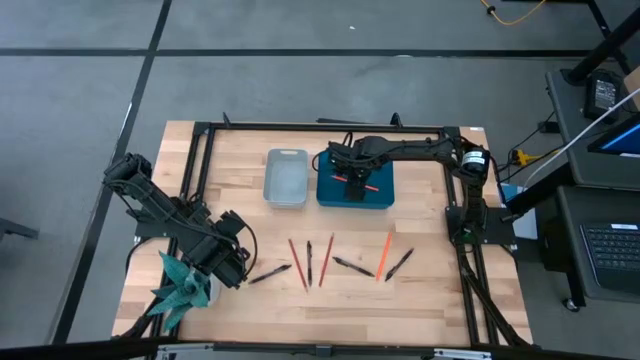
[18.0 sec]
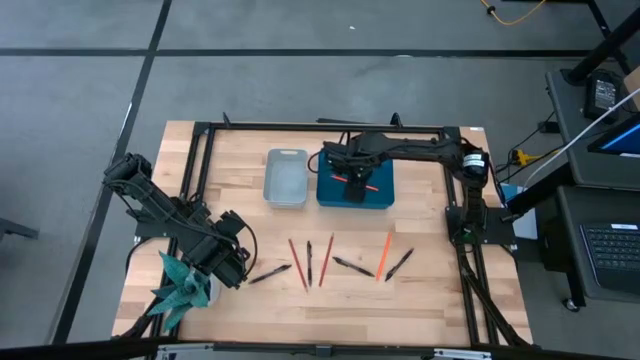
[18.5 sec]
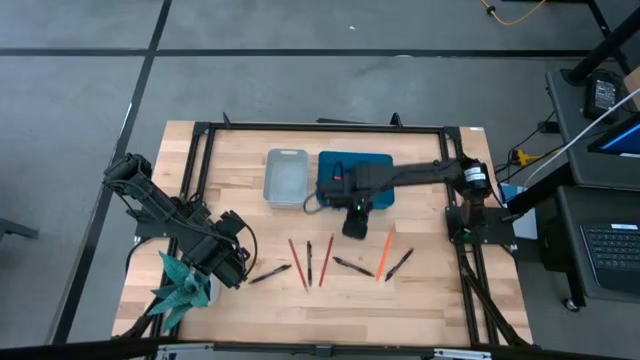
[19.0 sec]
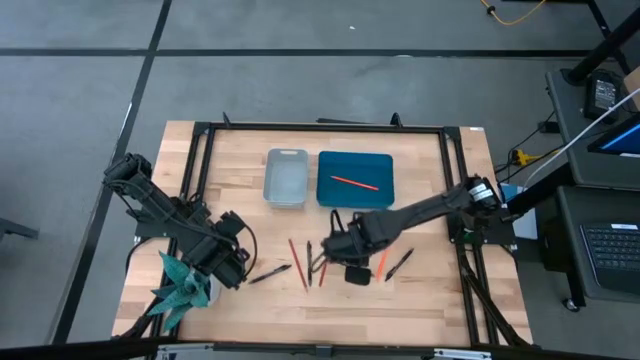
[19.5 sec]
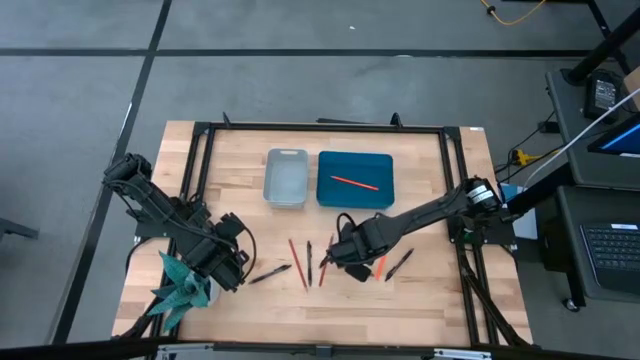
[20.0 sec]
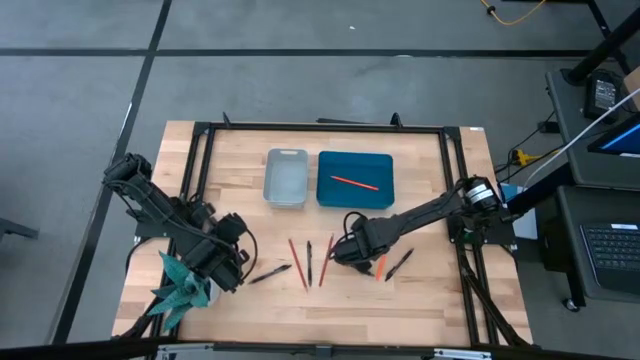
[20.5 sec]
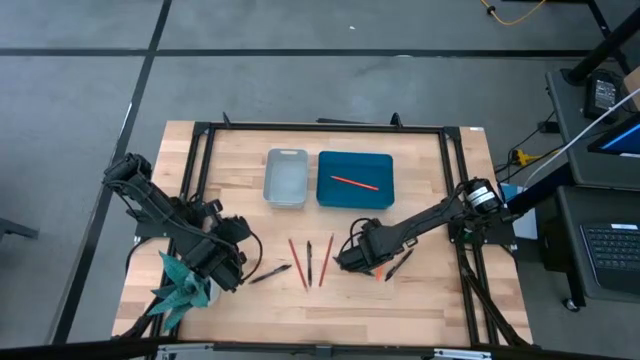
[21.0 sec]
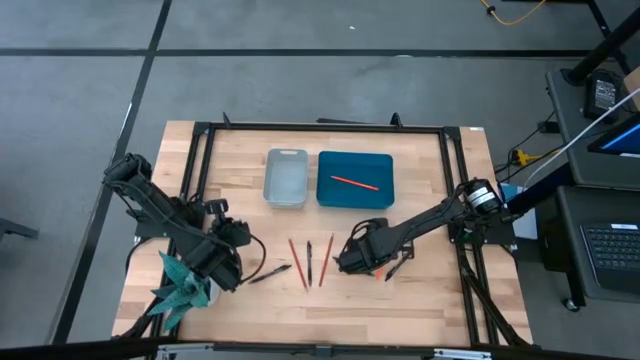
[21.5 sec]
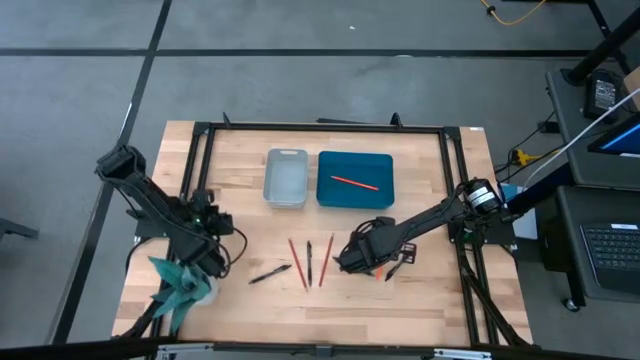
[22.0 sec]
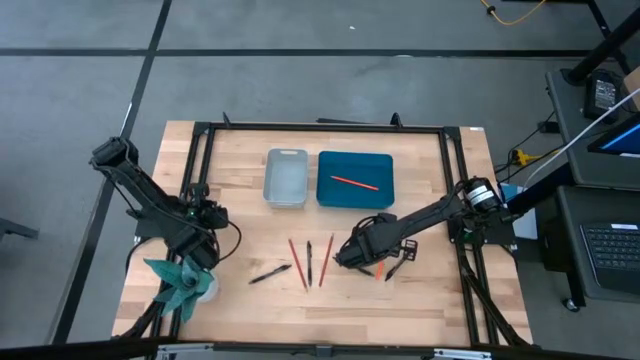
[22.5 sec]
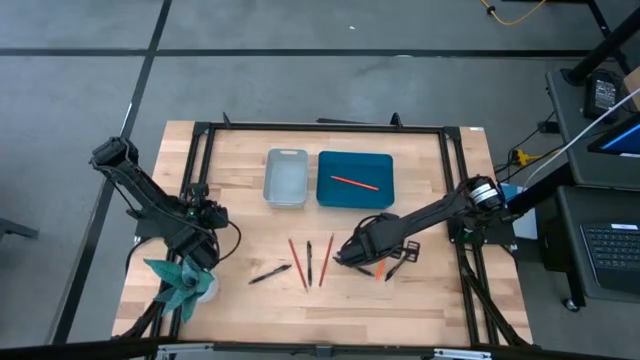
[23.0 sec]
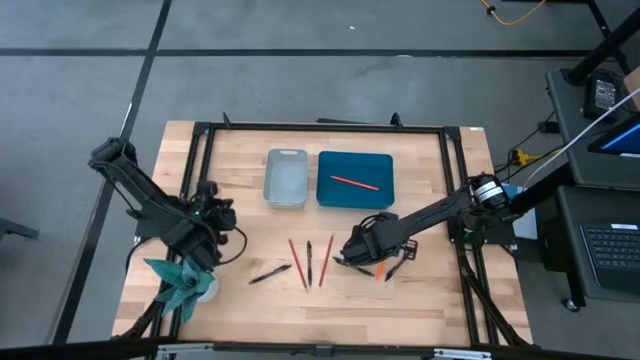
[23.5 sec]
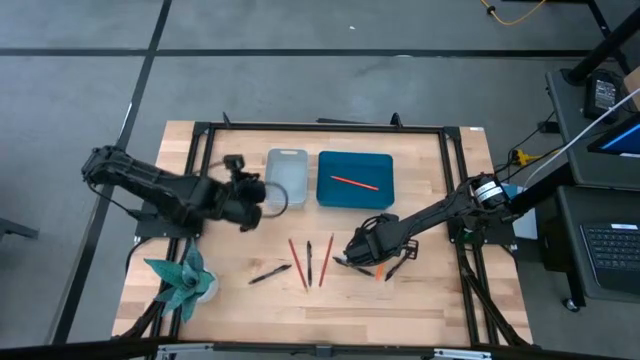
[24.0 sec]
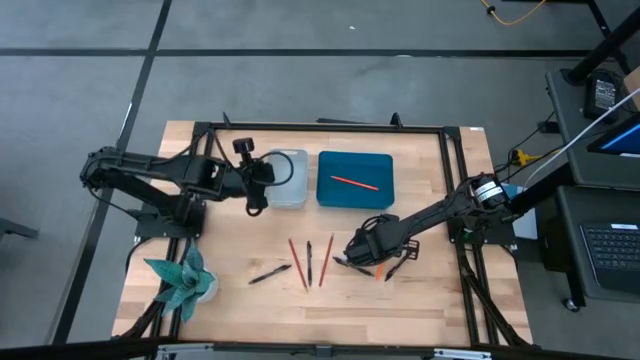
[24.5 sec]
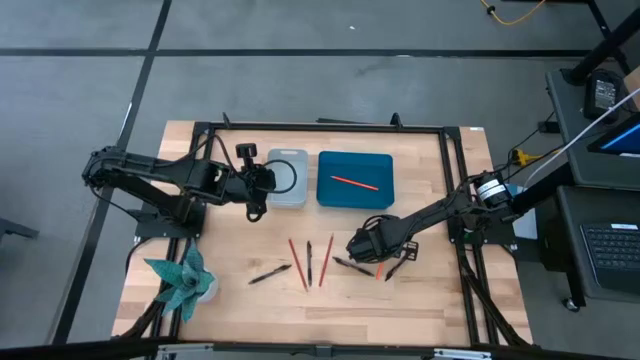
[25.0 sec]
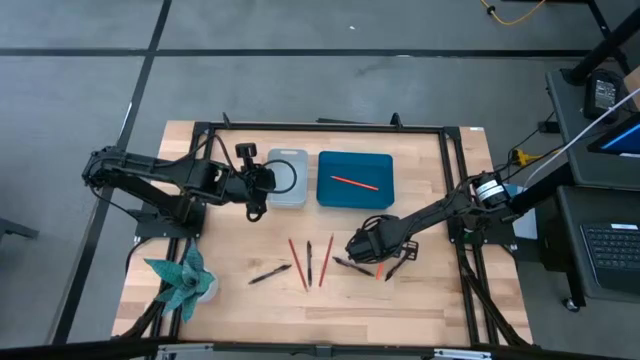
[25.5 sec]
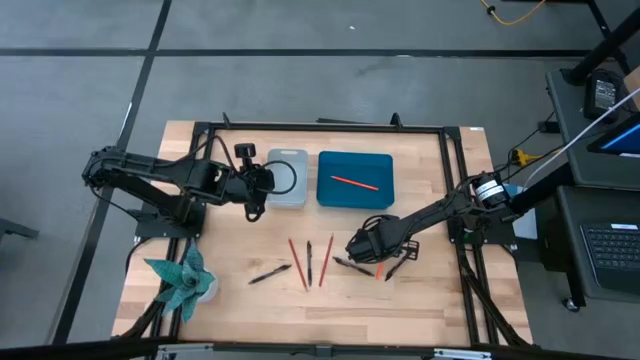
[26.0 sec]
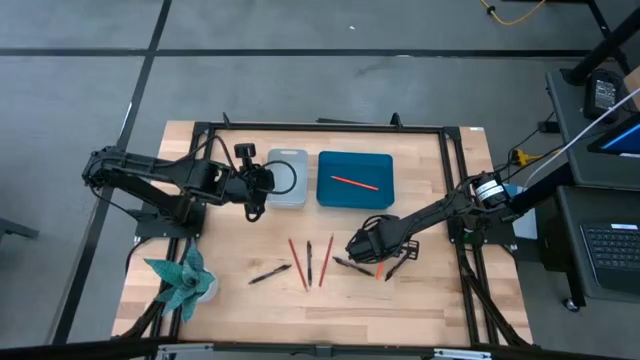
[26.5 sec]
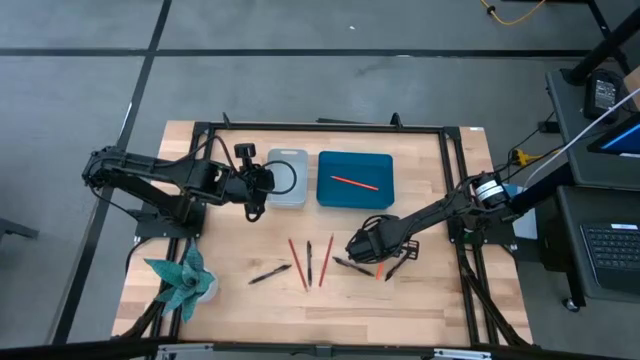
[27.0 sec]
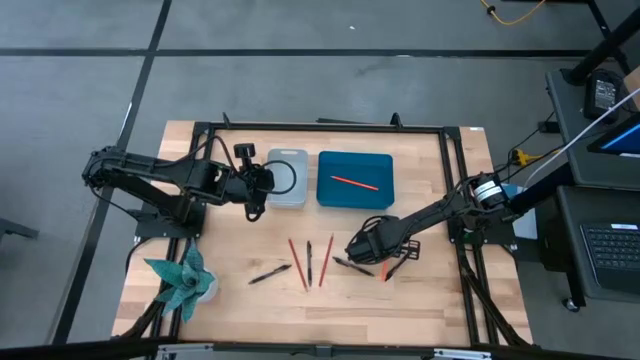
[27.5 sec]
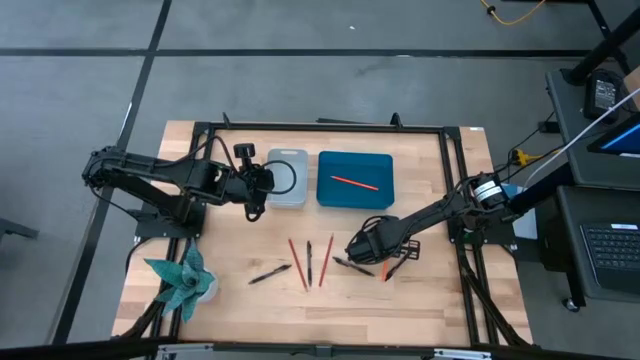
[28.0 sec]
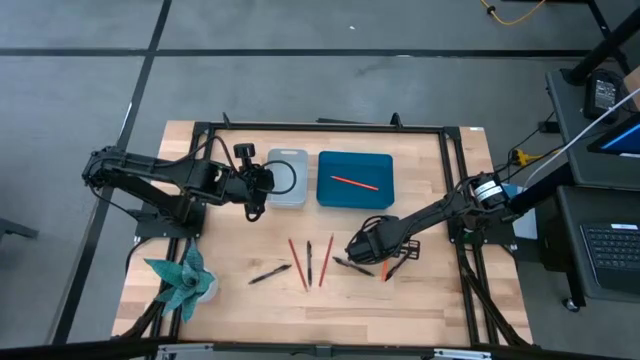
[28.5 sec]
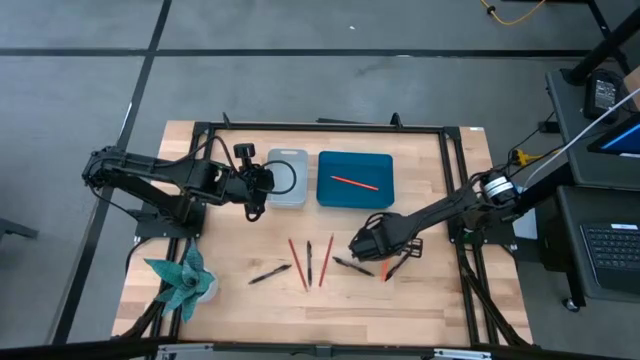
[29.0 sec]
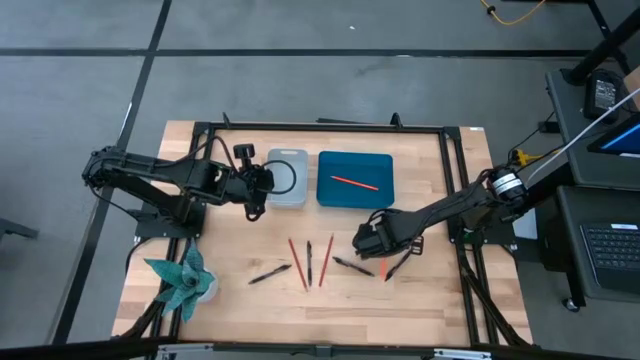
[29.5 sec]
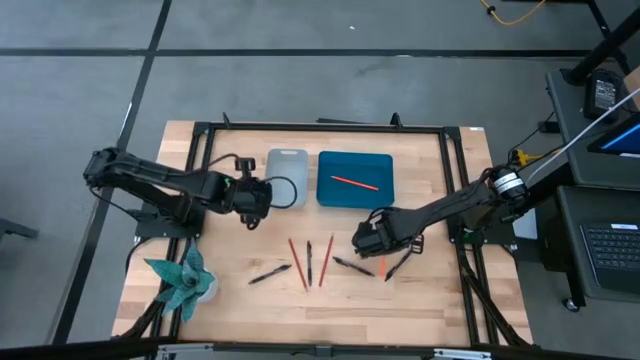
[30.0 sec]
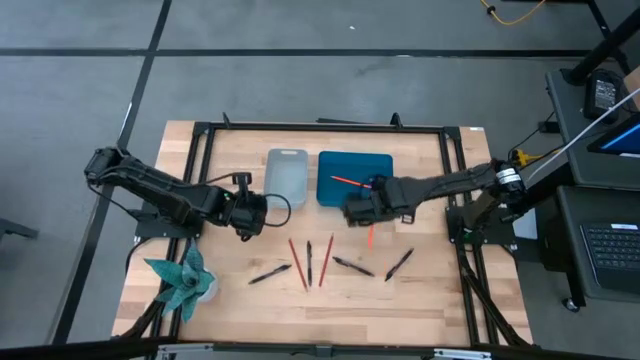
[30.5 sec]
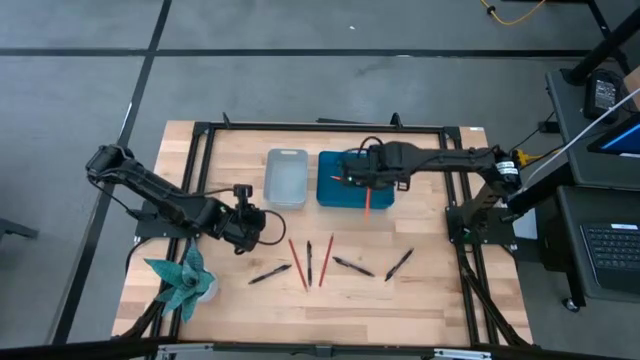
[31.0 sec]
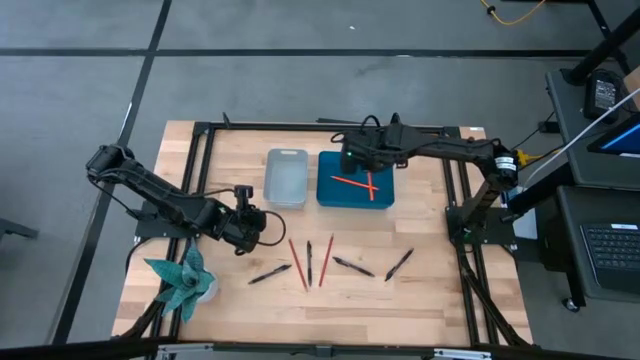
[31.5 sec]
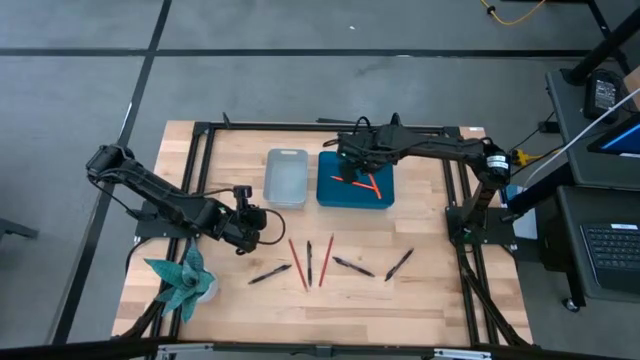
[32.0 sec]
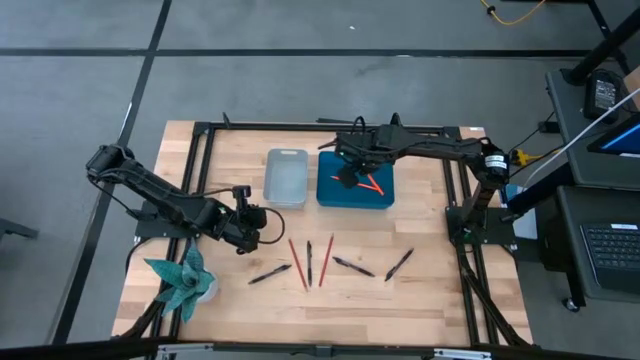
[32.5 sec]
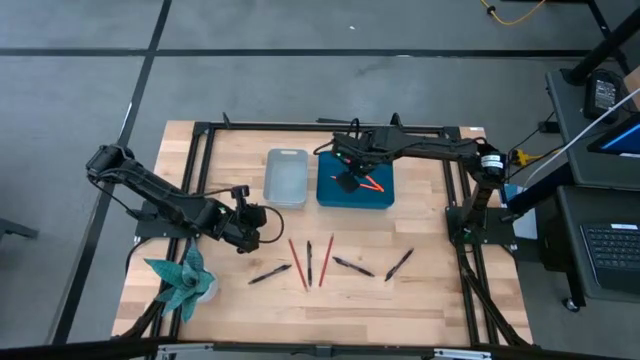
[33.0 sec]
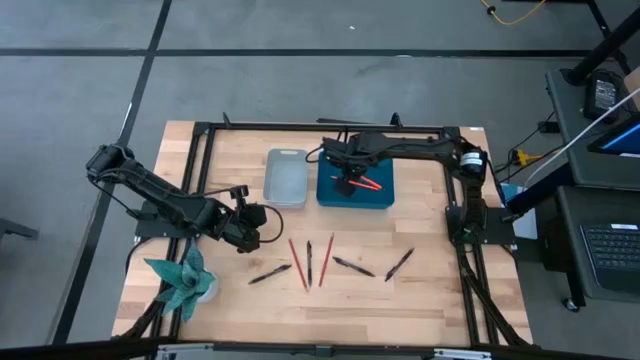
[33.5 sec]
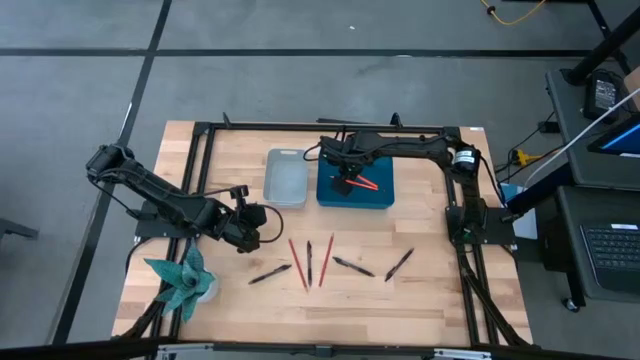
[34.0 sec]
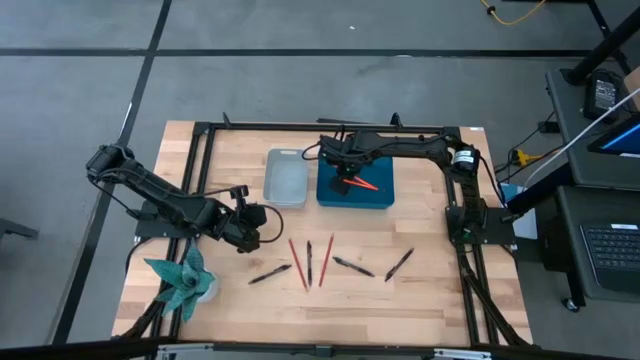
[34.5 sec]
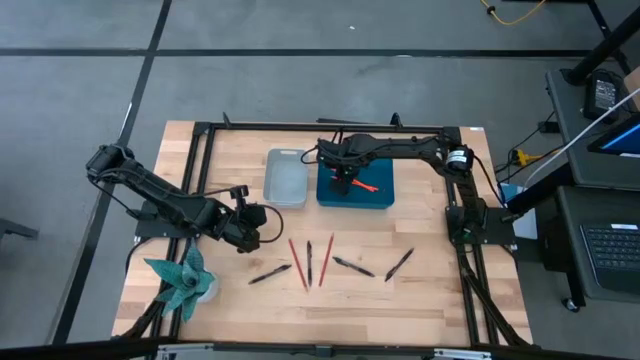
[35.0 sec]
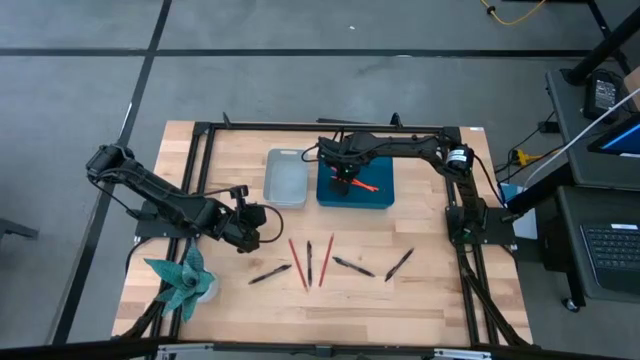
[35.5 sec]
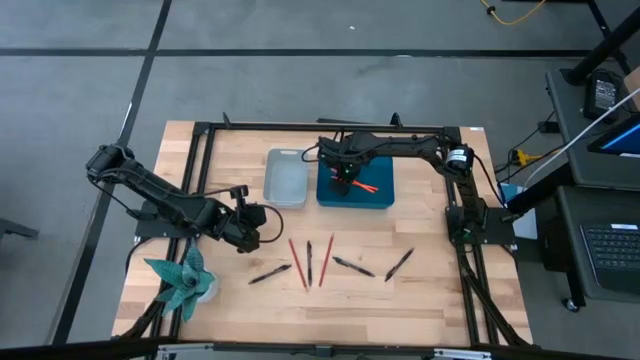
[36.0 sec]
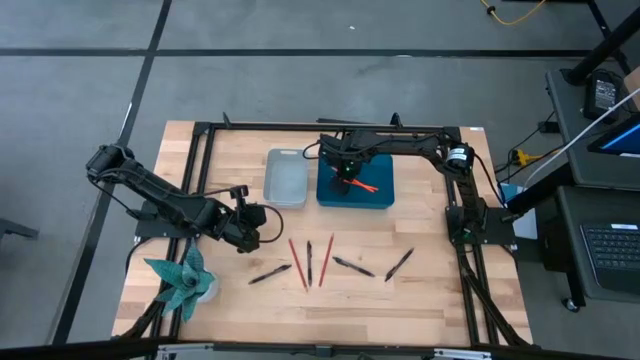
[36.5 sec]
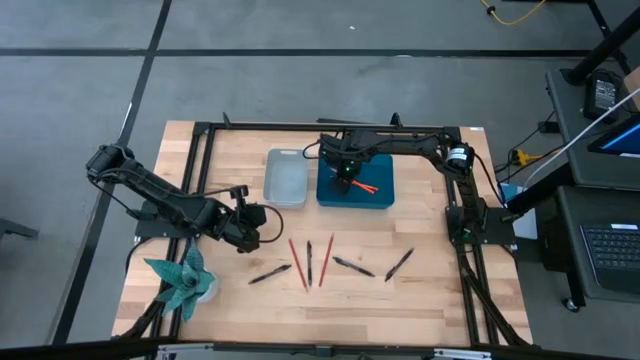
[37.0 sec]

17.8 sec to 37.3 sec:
Task: Sort pens & pencils
Put the orange pencil into the blue bin

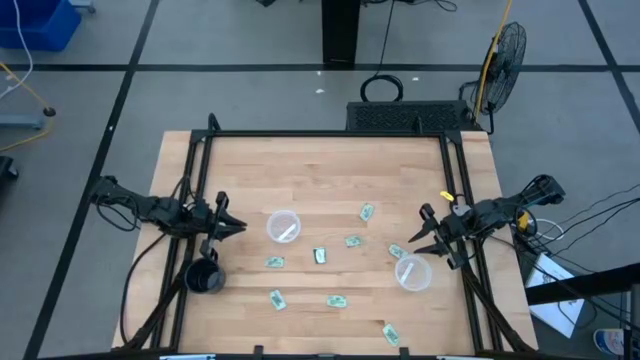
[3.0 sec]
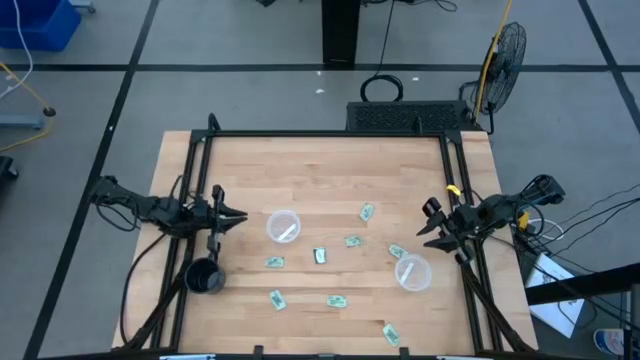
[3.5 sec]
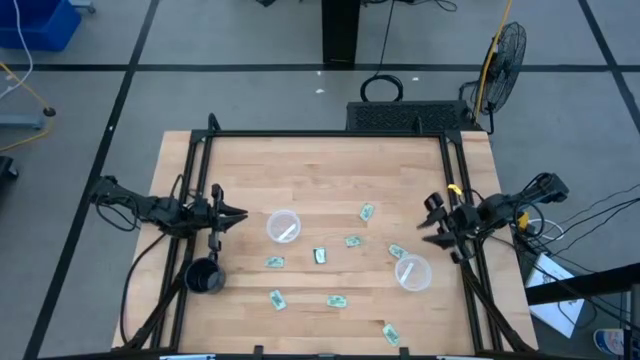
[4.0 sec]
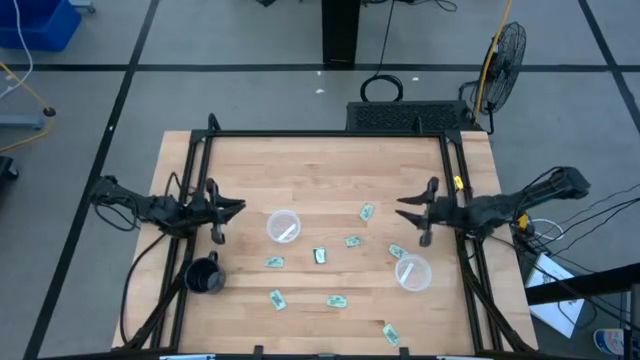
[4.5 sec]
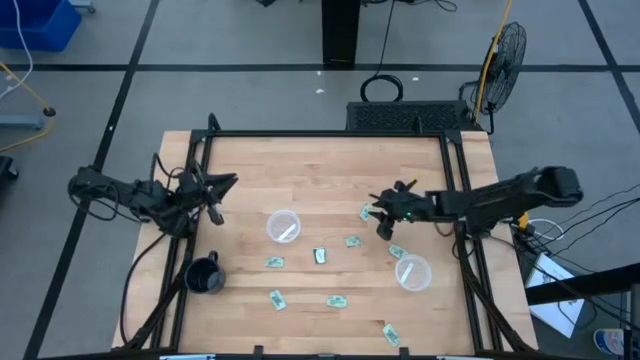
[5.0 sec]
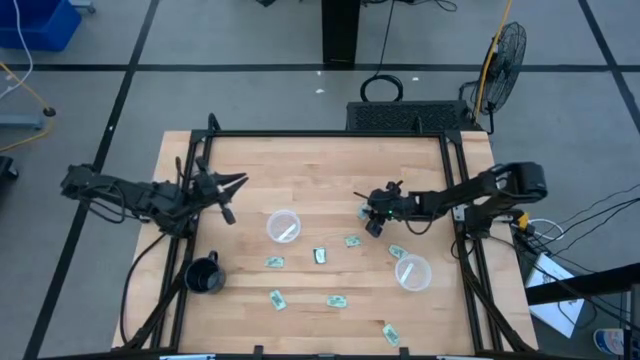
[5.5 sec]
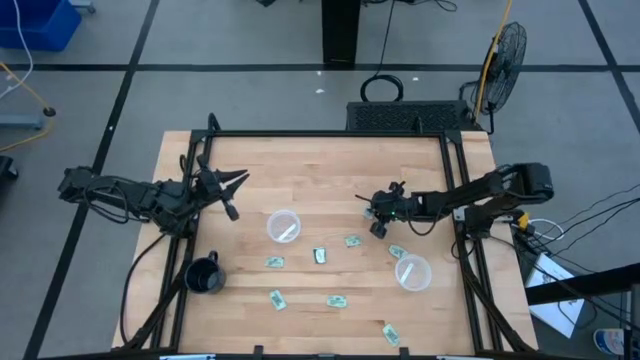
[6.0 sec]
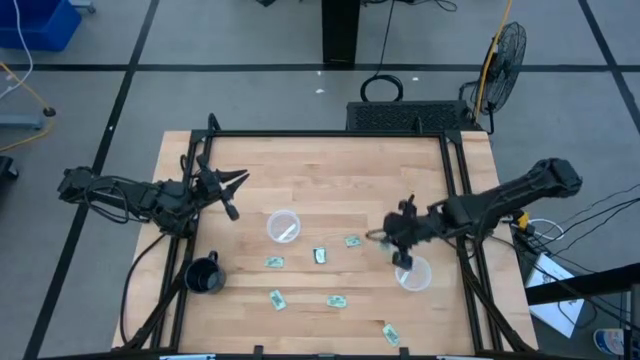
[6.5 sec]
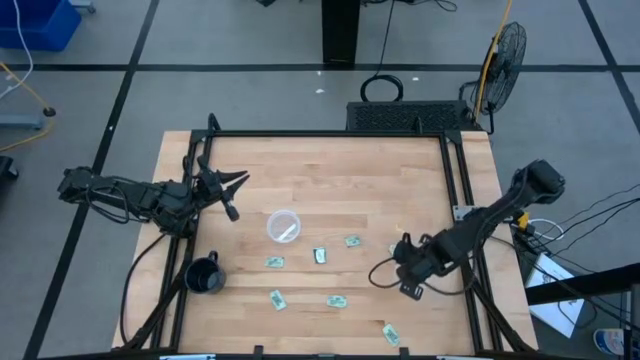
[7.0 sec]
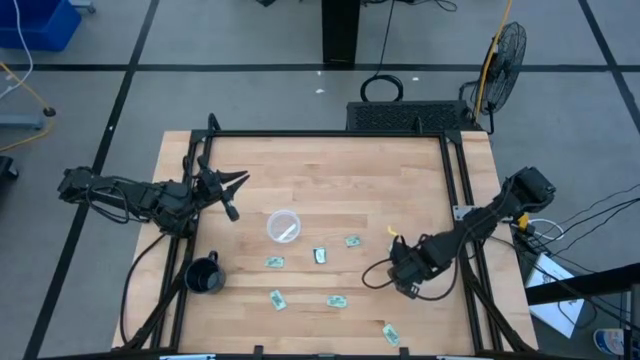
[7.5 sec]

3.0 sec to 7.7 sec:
Task: Pick and place Stevia / Truvia into bins
Put the green stevia packet into the right transparent container
